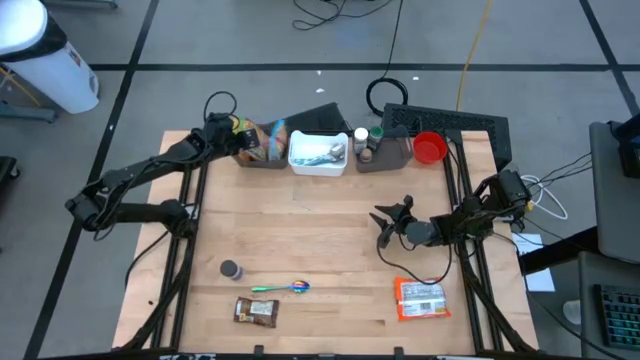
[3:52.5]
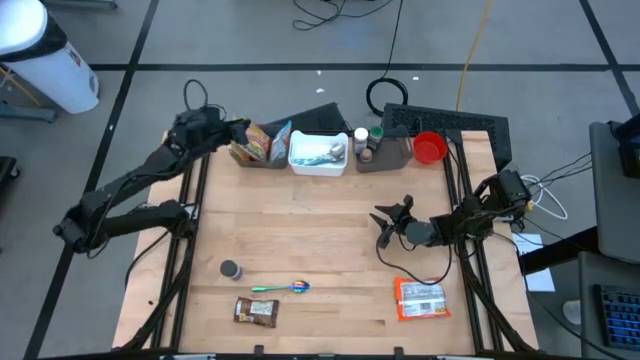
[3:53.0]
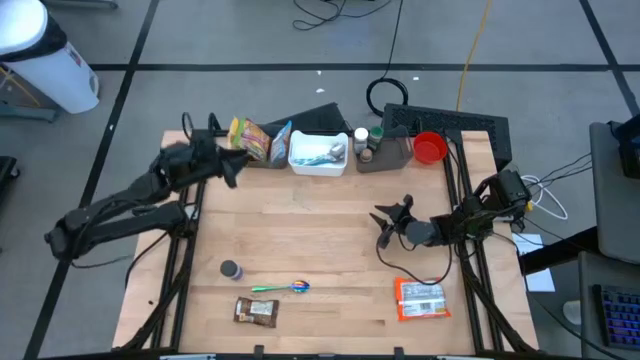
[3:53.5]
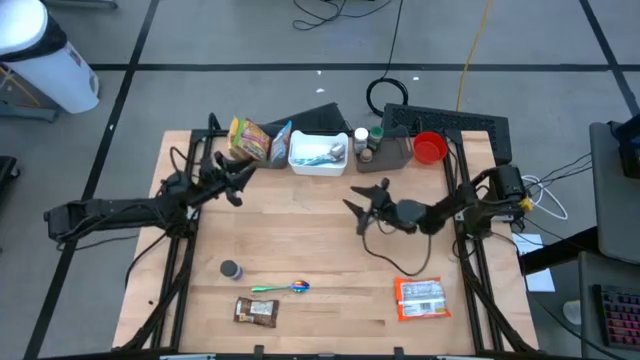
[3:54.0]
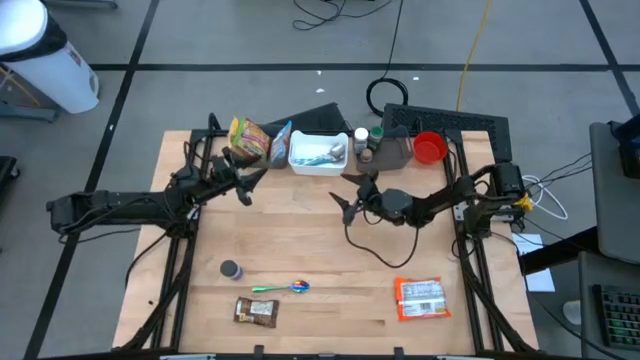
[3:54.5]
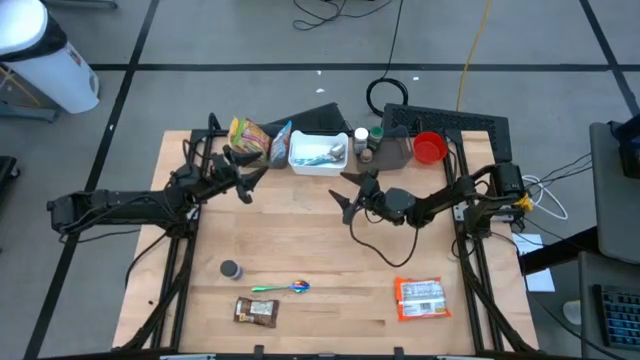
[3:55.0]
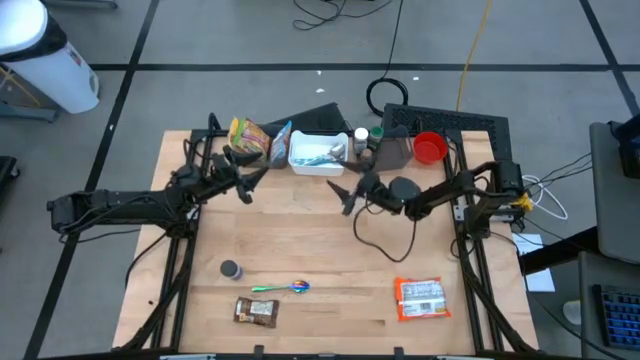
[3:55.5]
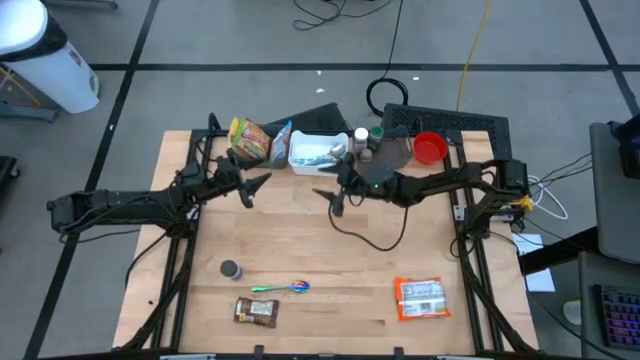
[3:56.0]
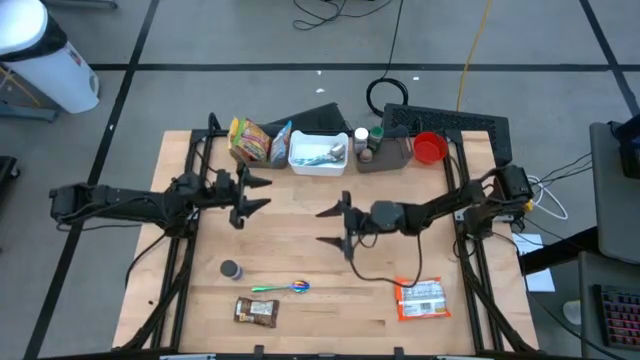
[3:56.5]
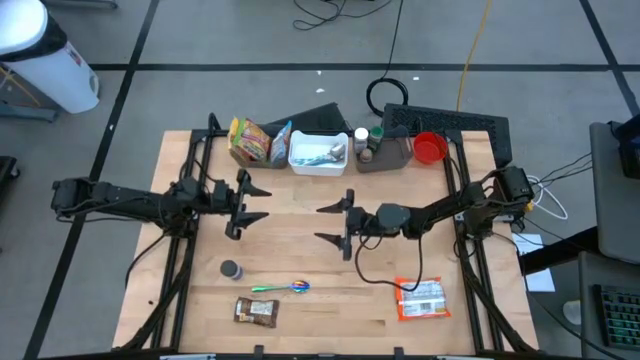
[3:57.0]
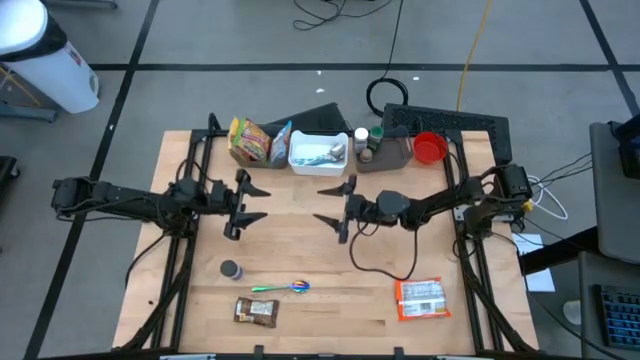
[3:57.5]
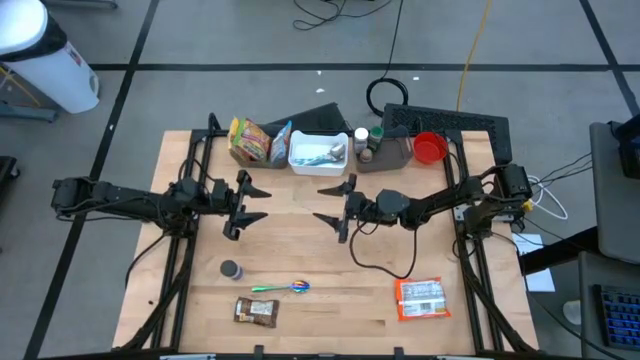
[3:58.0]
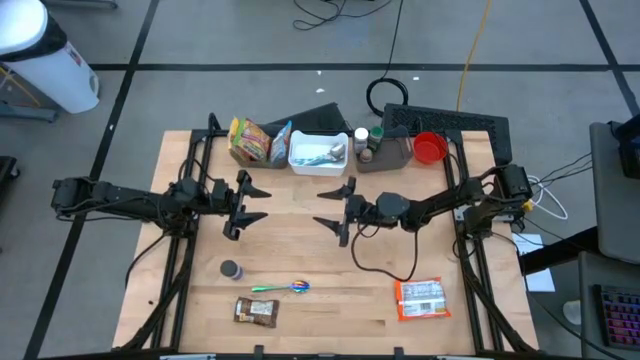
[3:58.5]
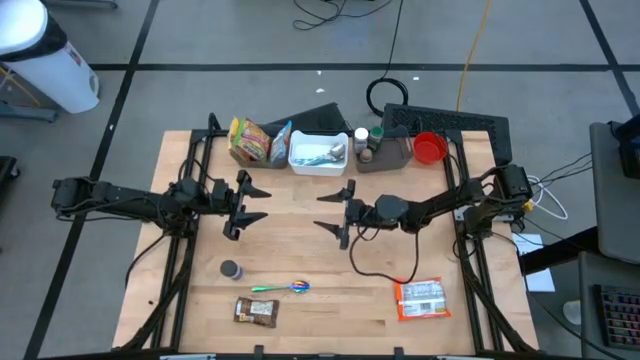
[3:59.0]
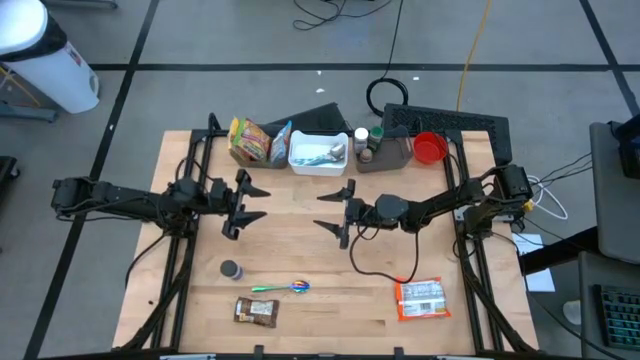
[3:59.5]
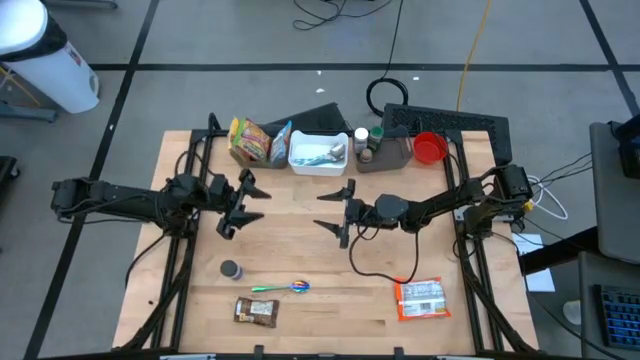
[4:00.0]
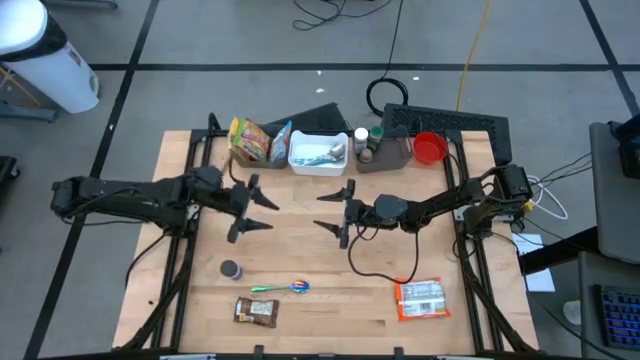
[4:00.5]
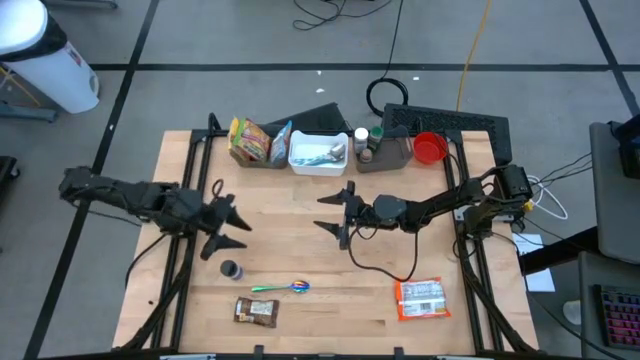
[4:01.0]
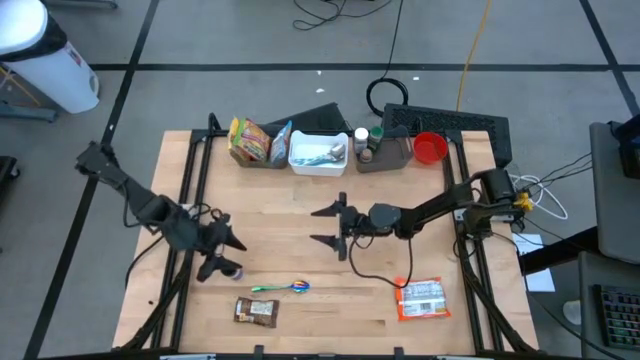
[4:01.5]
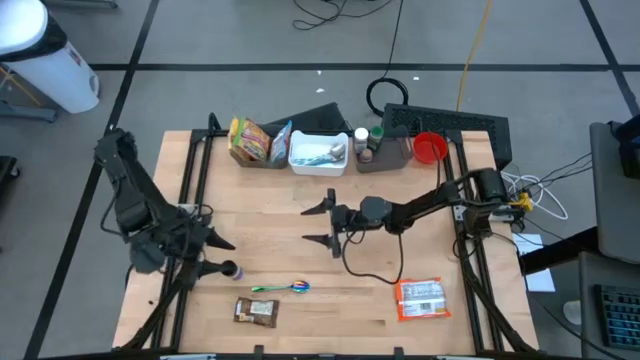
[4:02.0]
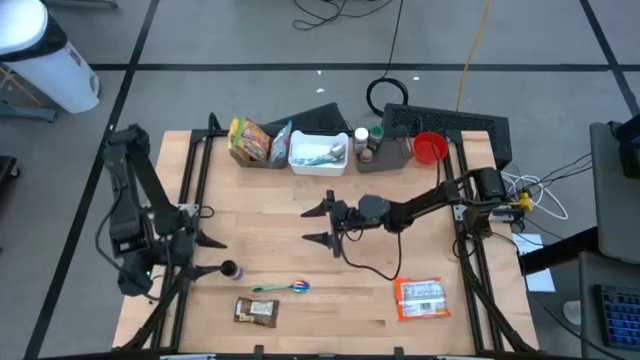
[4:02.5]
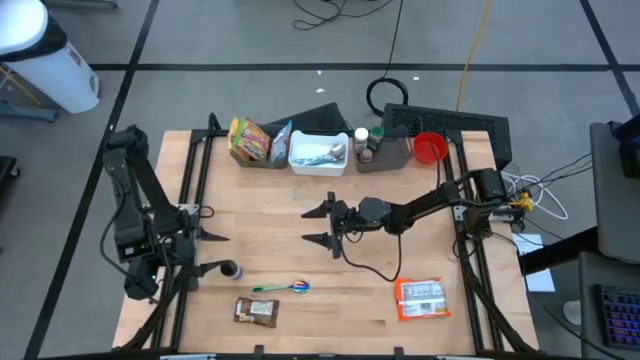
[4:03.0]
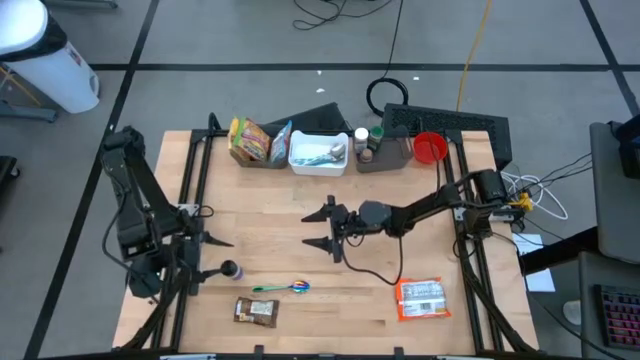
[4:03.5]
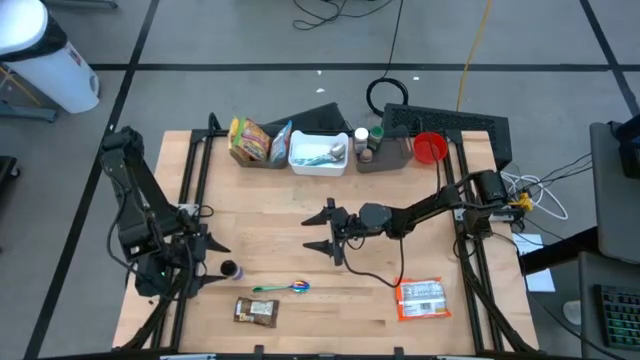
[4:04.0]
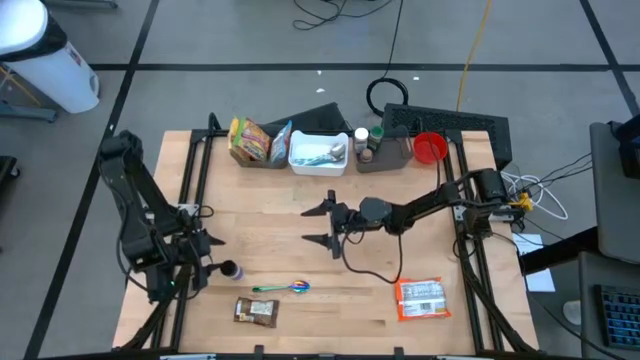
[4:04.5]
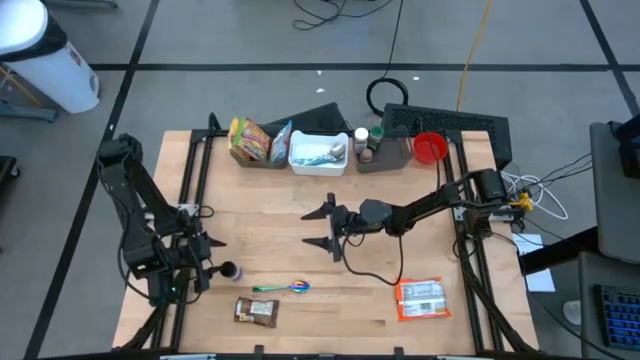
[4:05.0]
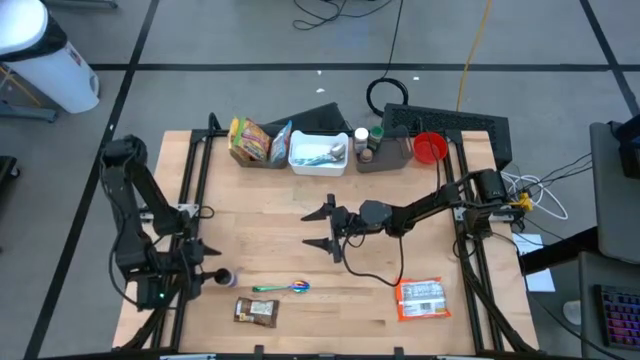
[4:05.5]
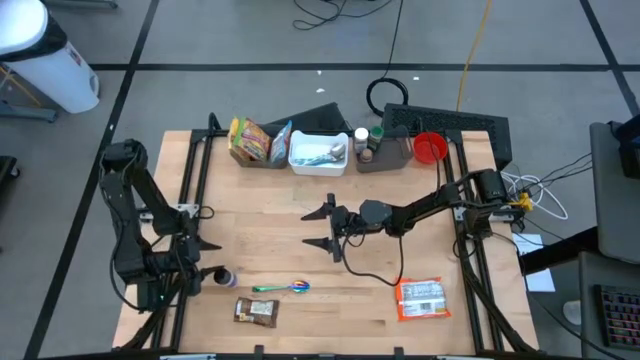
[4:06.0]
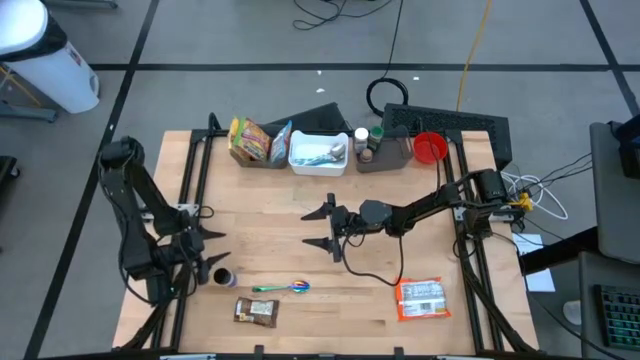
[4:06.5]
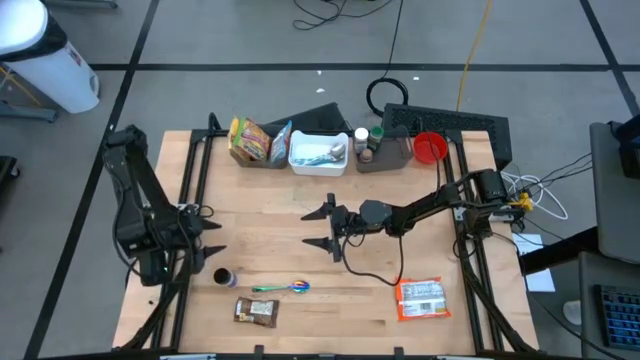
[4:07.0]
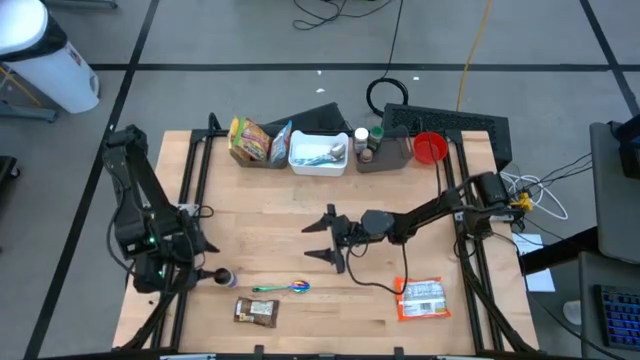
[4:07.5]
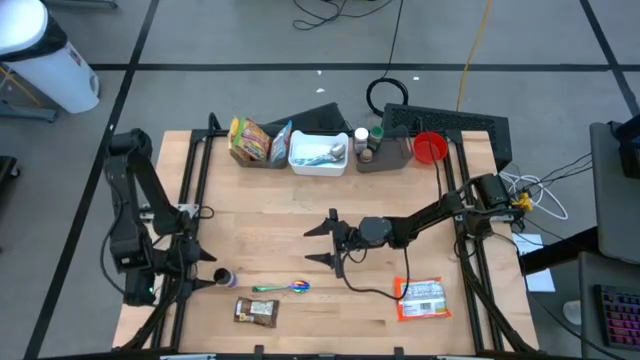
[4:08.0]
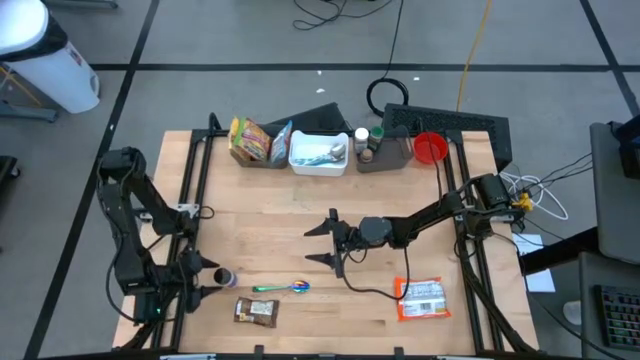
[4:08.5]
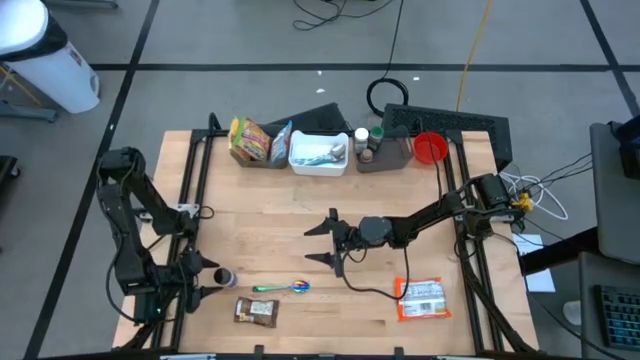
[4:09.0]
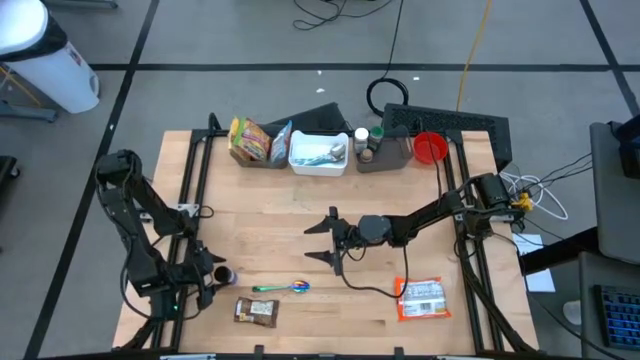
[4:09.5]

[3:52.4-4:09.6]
Task: Pick & Place Food Item
Put the violet seasoning into the right black bin

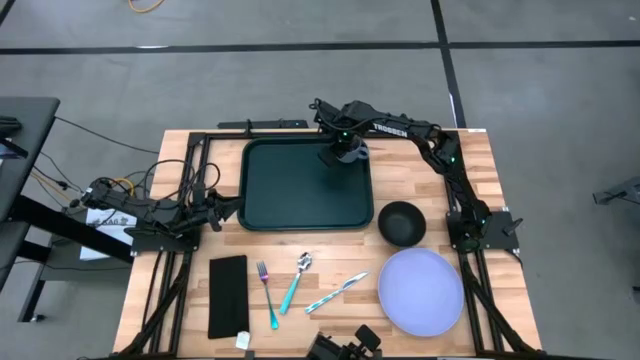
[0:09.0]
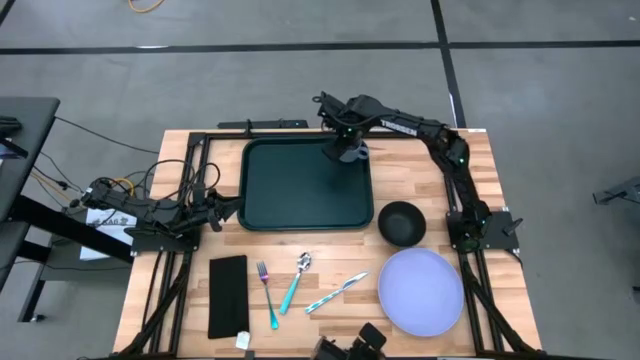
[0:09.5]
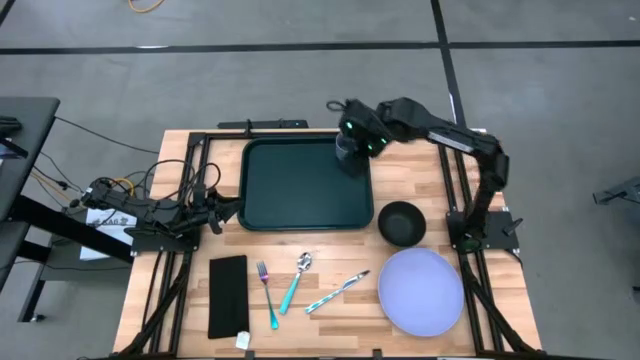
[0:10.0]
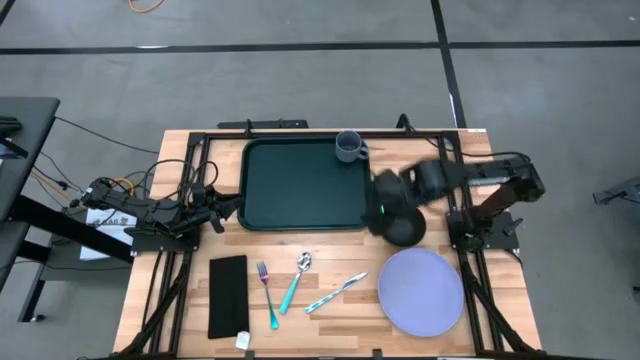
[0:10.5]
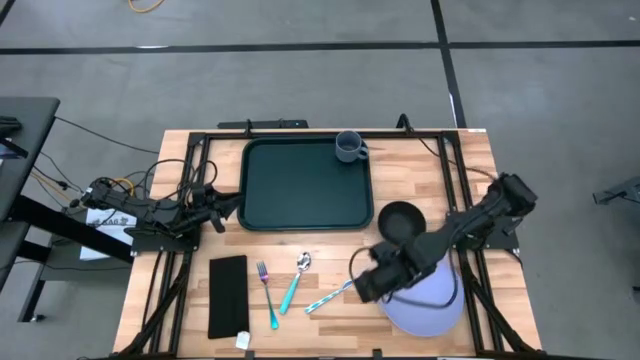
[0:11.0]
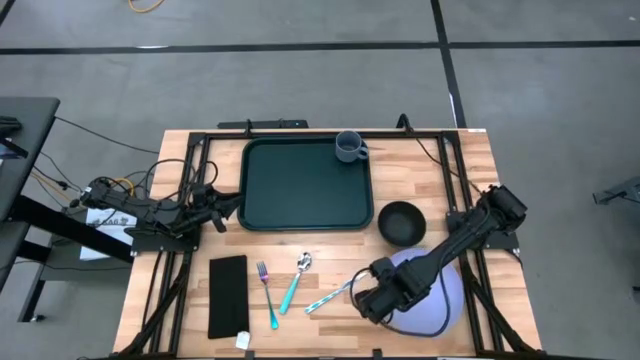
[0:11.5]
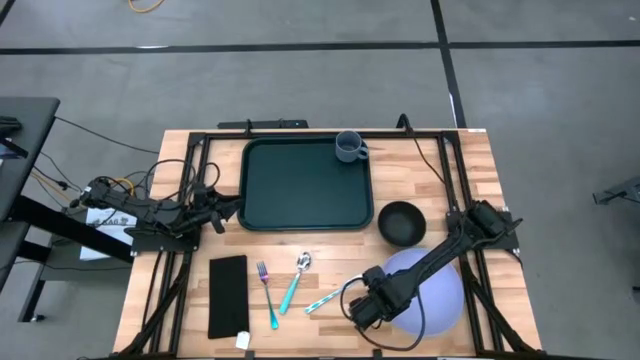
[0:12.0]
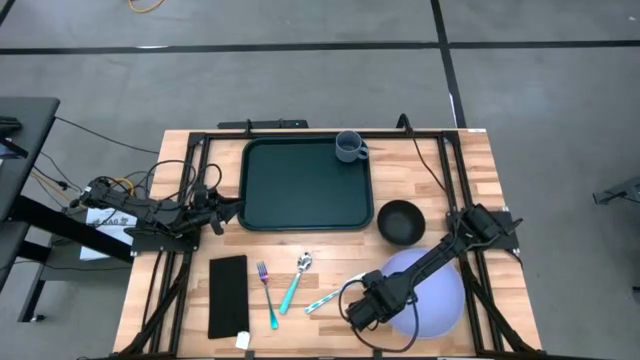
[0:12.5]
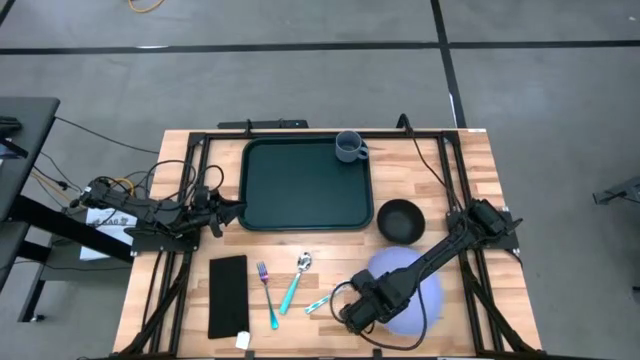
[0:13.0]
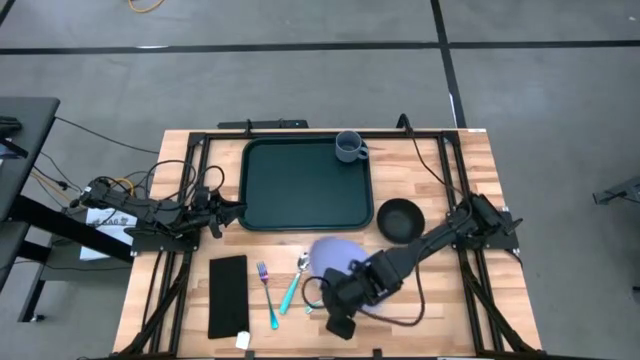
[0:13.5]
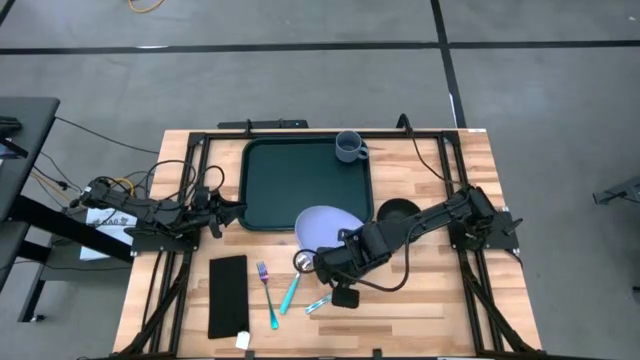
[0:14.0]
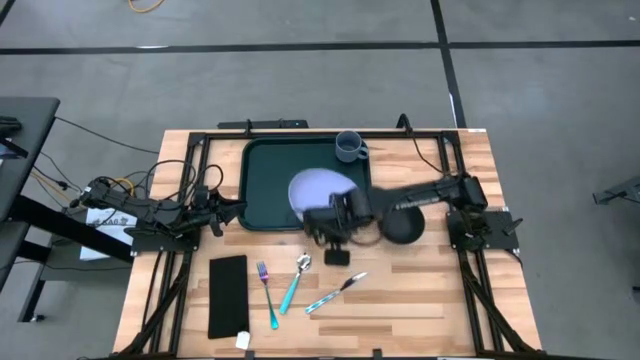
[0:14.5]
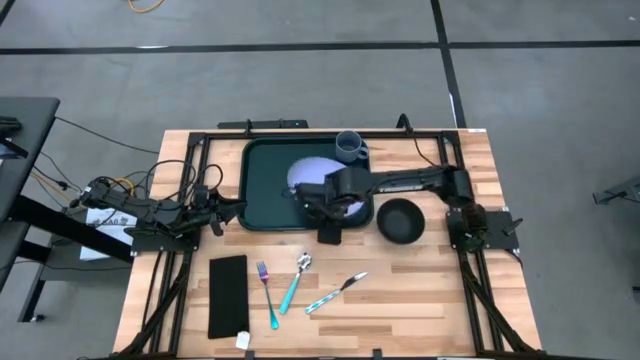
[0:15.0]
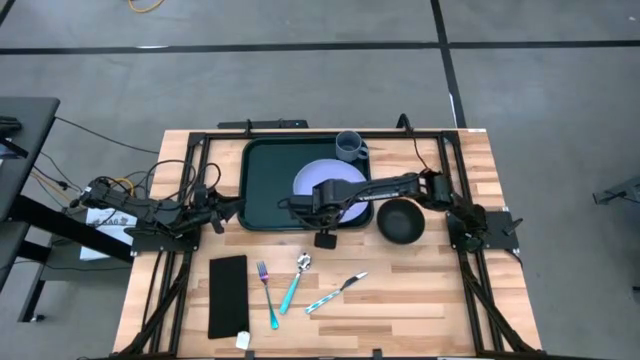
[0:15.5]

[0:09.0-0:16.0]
Task: Set up tray
Put the purple plate on the black serving tray to the bottom left of the gray mug
